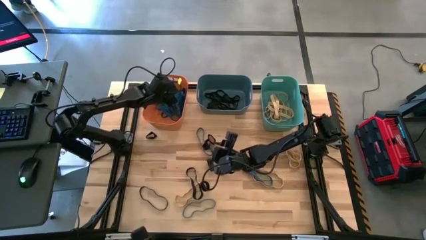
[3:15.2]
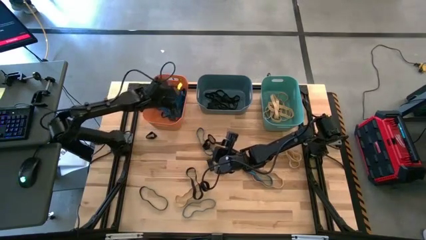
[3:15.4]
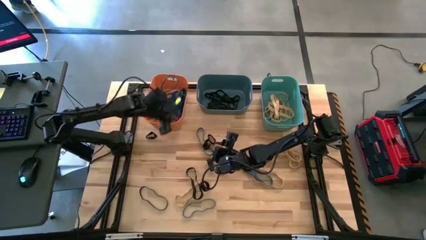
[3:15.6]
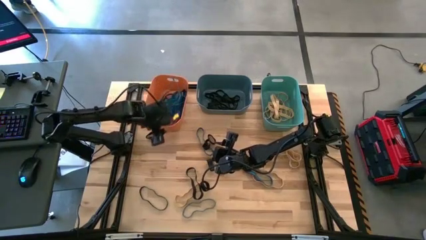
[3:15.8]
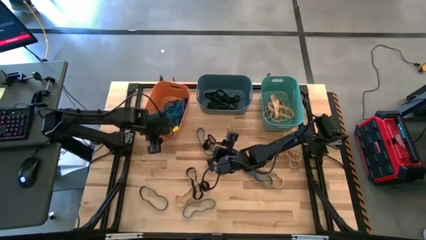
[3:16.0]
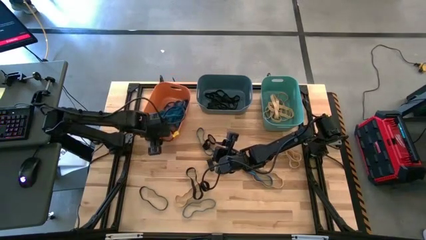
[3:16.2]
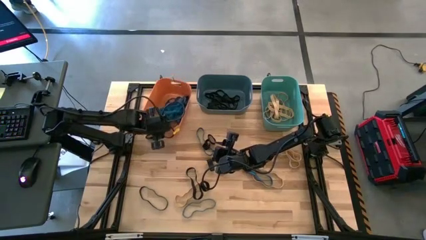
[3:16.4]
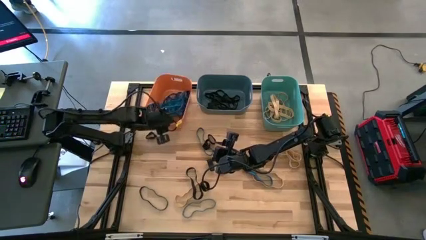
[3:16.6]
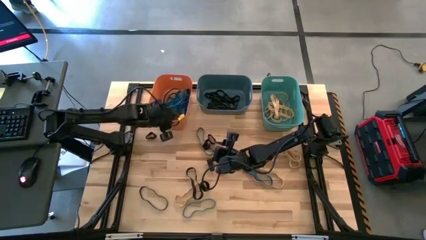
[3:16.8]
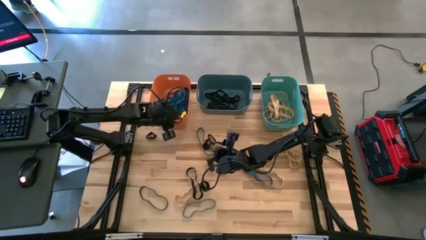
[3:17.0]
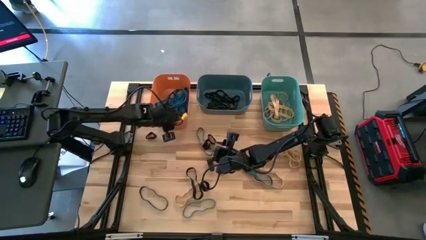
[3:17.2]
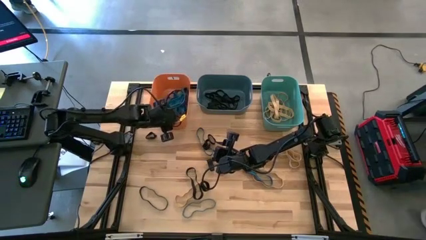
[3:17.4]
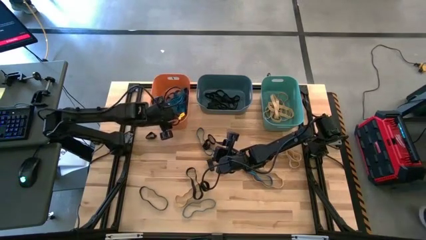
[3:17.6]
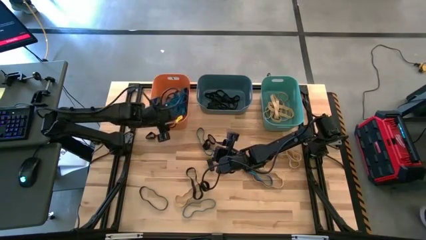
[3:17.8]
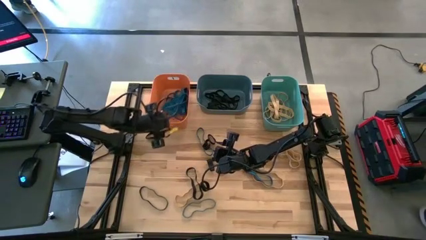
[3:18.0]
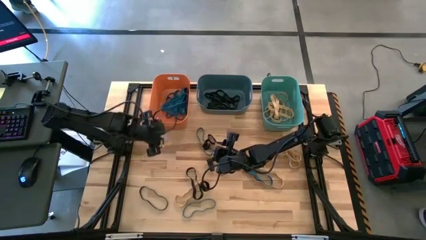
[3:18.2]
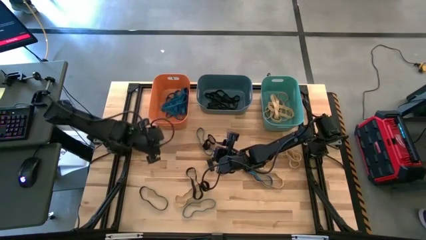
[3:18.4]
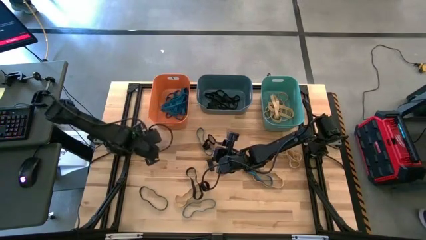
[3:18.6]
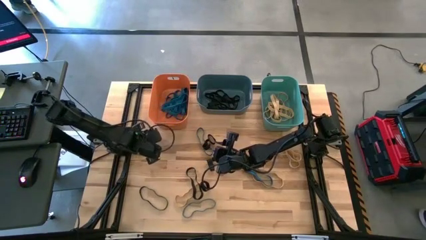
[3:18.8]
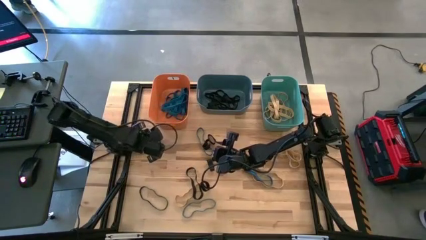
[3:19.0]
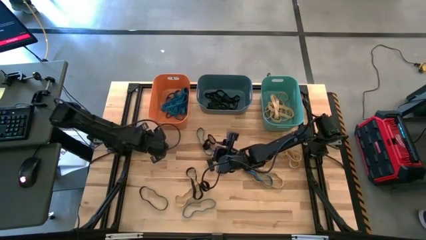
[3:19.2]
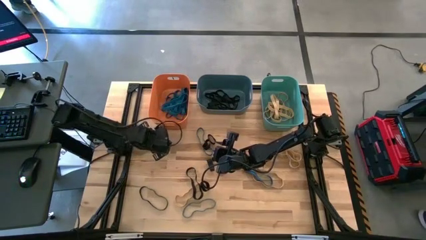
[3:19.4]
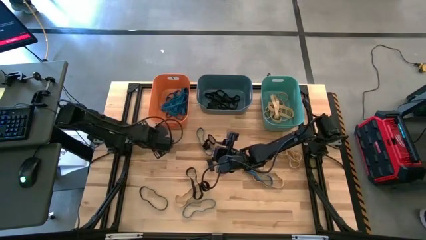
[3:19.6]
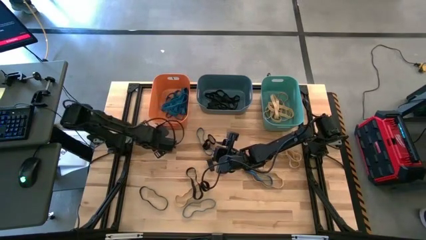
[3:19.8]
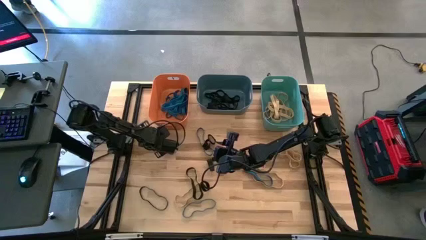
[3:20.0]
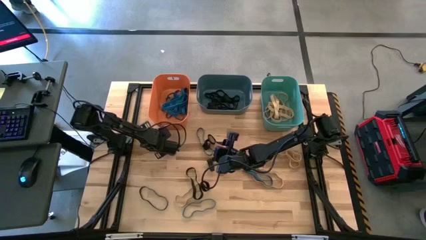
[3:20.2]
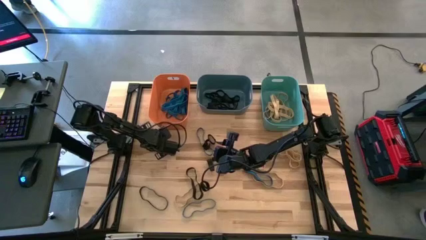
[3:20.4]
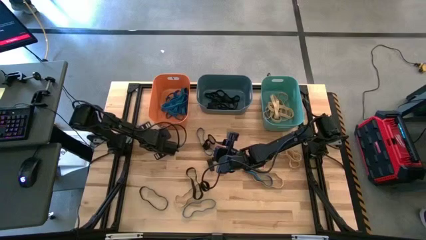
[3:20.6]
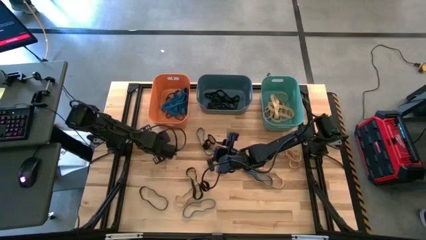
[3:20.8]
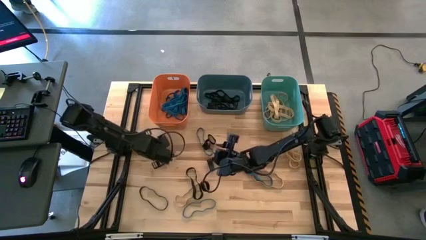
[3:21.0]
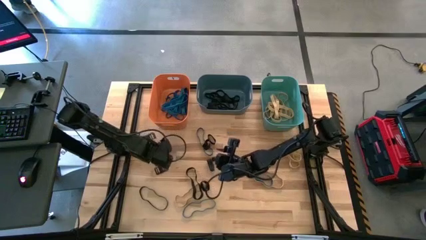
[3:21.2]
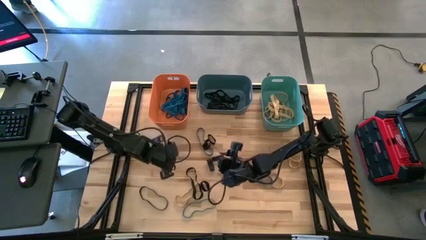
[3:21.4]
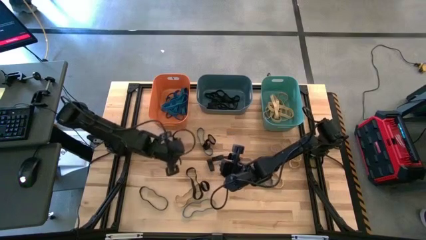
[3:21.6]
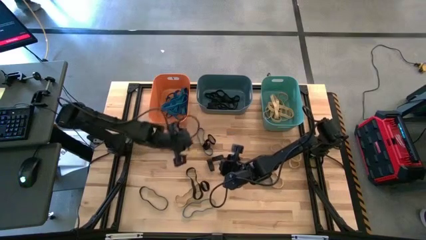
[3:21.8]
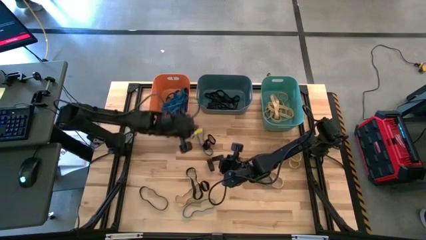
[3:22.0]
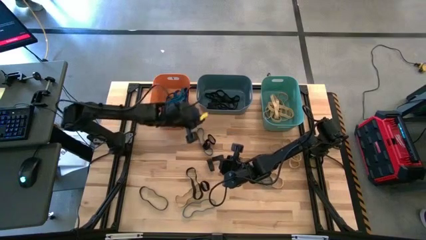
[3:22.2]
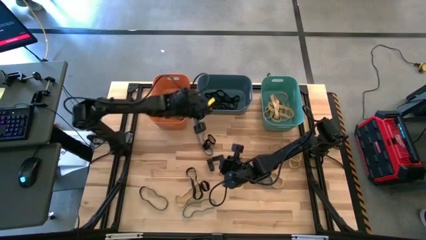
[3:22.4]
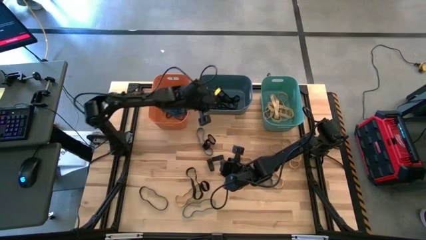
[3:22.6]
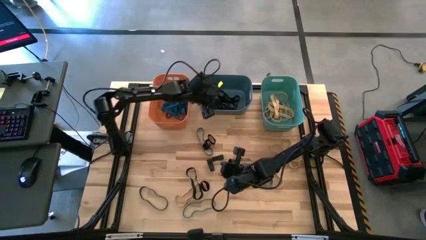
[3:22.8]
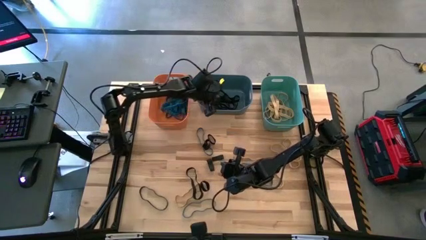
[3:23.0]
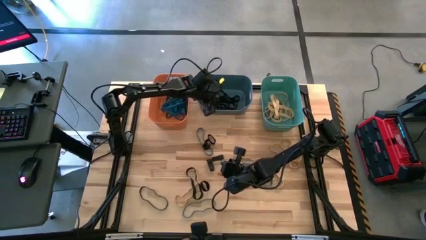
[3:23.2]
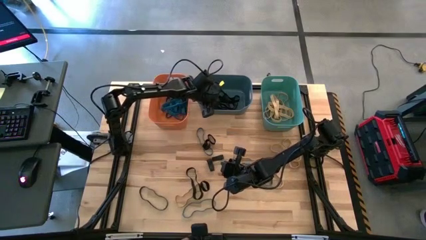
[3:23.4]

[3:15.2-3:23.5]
Task: Sort rubber bands into baskets
Put the black rubber band into the blue bin

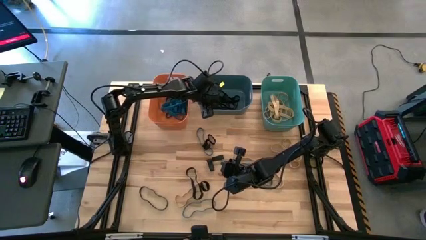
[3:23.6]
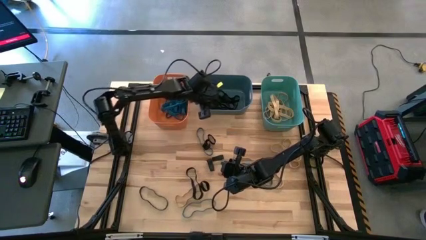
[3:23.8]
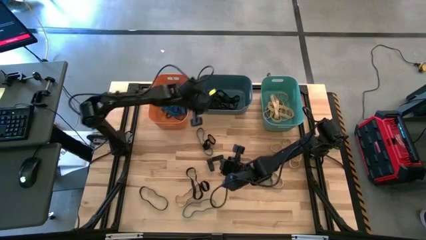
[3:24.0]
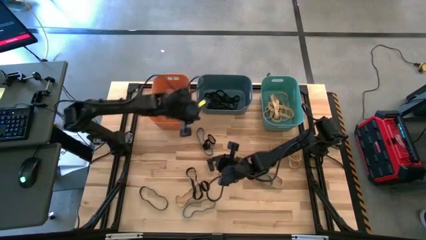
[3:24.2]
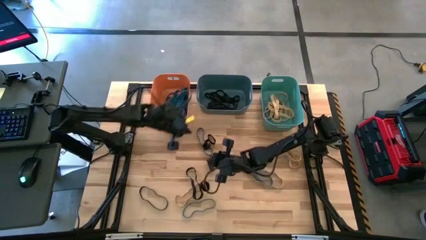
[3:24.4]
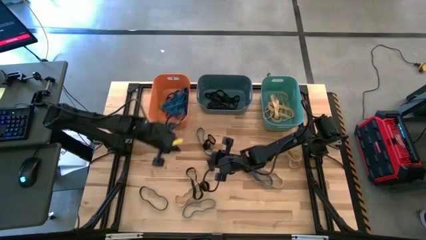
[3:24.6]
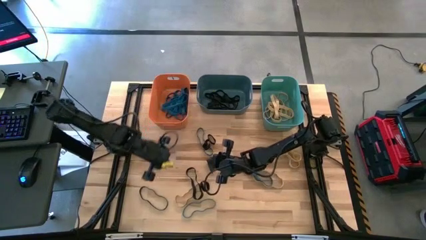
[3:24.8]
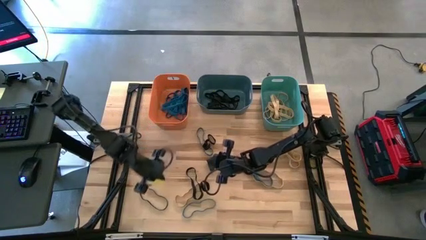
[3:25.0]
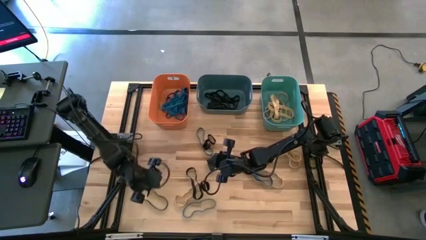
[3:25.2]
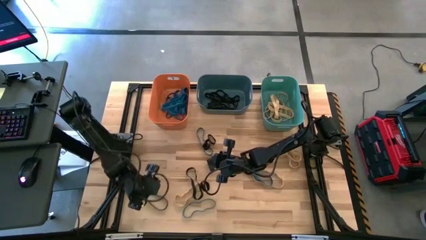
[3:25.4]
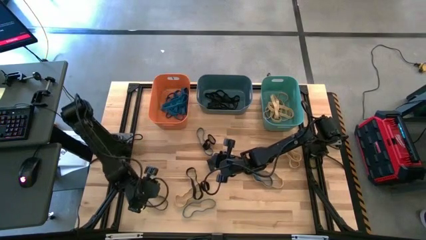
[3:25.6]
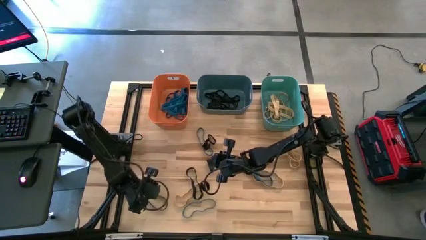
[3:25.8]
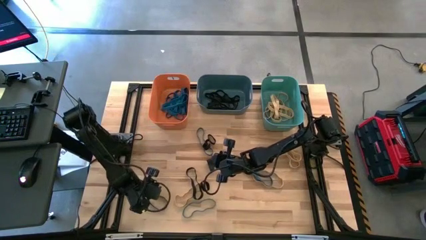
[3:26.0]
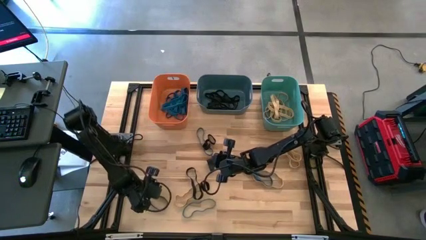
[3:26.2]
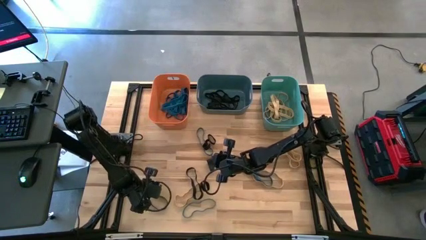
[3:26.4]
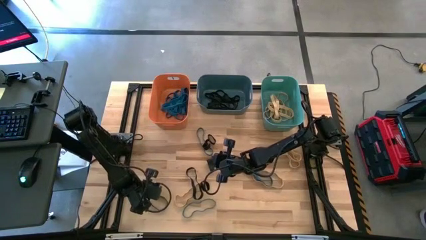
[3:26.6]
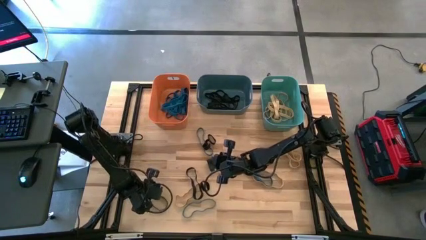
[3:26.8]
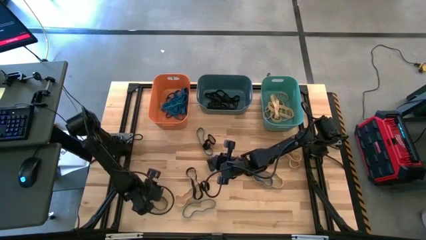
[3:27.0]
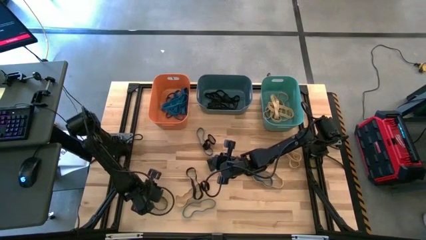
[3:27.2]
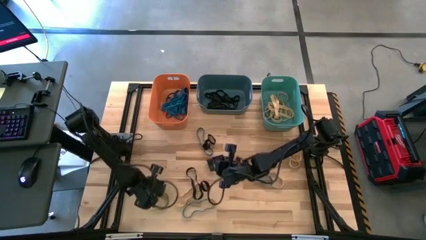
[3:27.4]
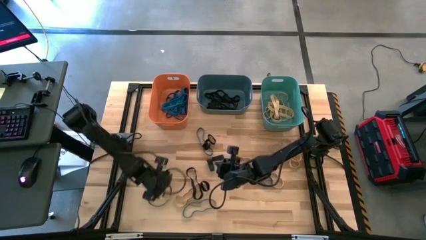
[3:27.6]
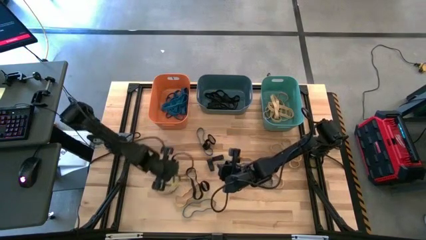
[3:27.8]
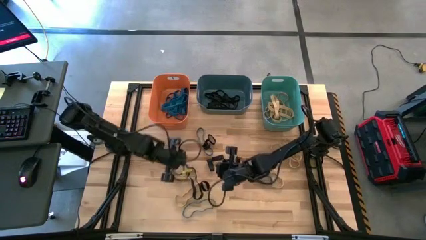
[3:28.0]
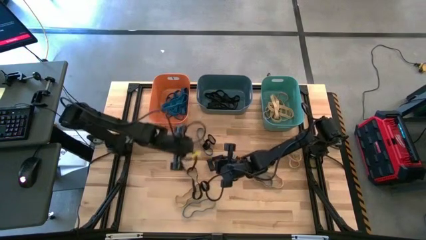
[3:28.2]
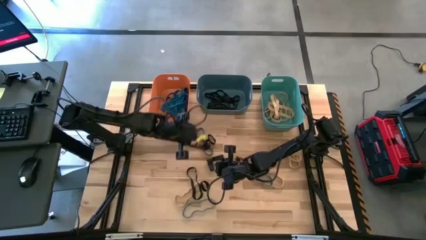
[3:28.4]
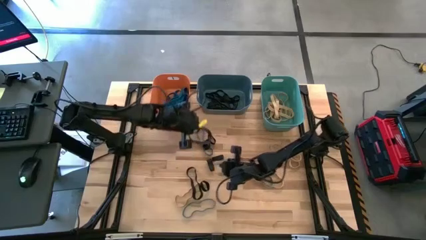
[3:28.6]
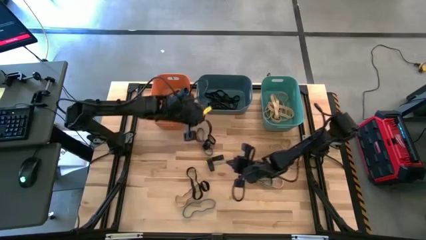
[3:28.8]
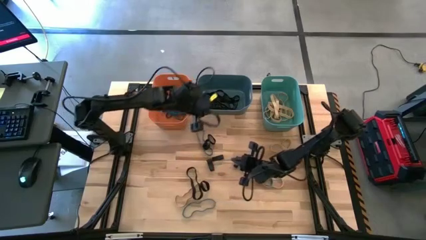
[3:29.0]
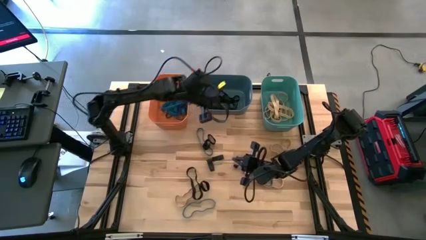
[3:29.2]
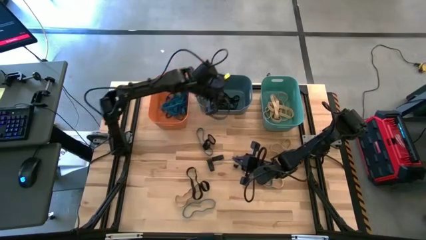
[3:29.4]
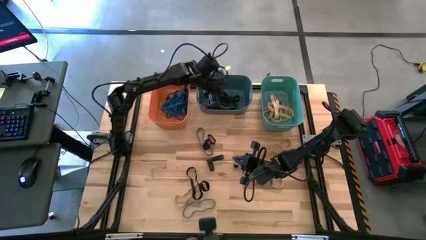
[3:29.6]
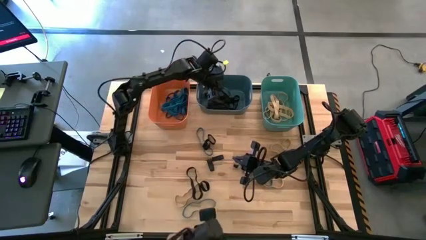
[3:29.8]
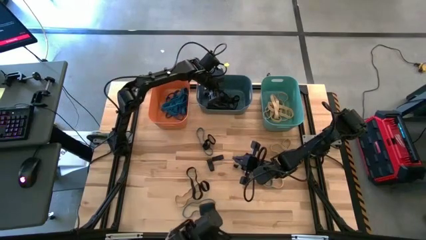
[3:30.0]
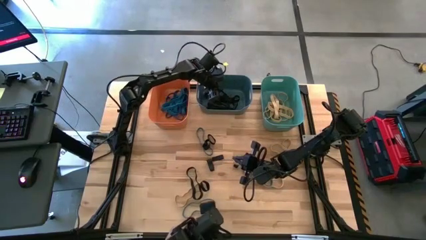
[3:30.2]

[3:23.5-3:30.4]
Put the black rubber band into the blue bin

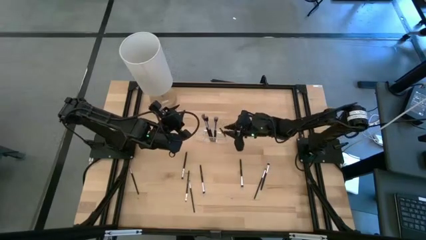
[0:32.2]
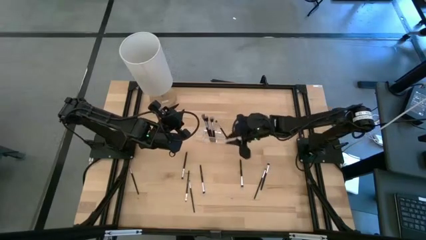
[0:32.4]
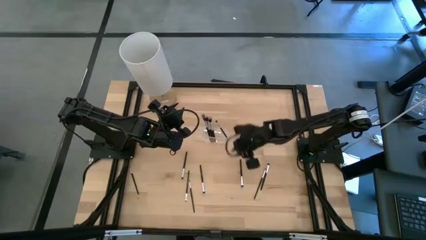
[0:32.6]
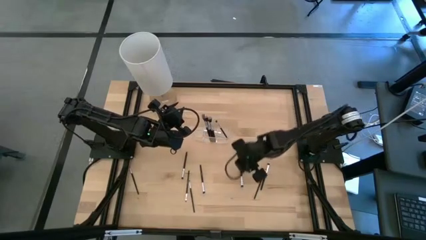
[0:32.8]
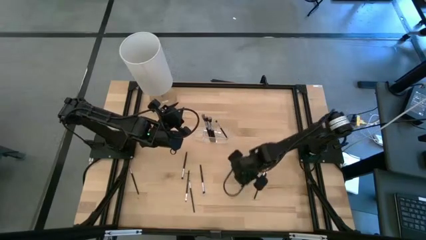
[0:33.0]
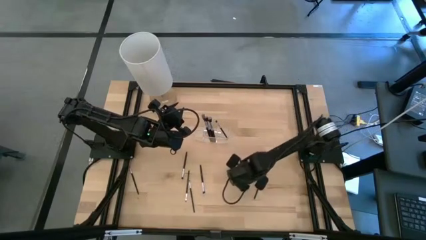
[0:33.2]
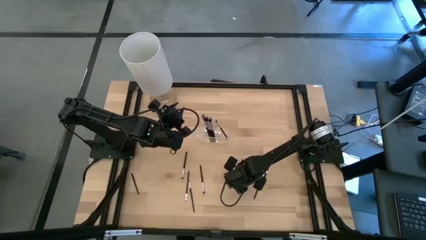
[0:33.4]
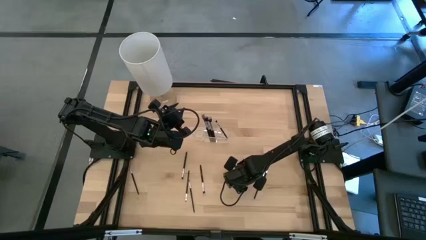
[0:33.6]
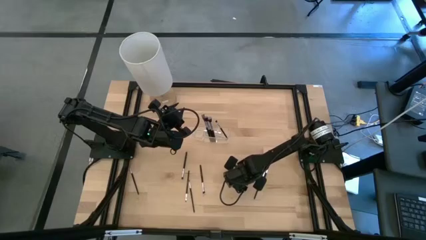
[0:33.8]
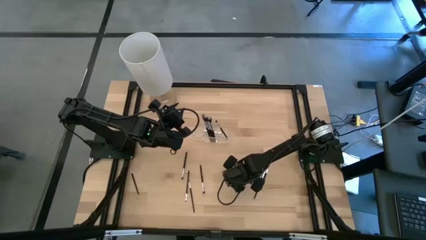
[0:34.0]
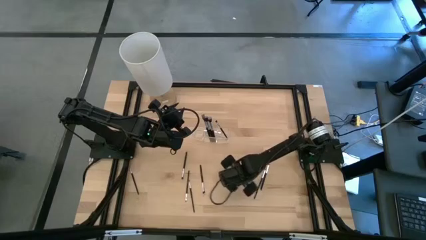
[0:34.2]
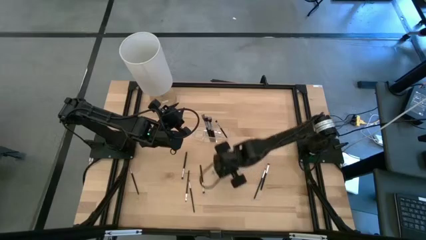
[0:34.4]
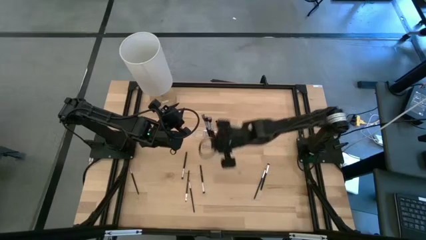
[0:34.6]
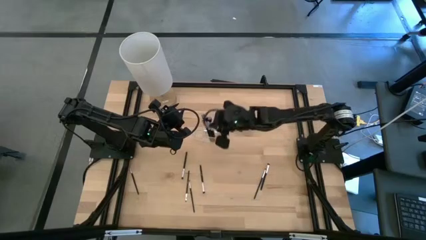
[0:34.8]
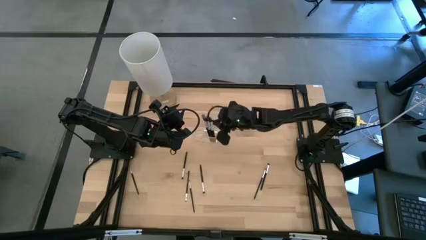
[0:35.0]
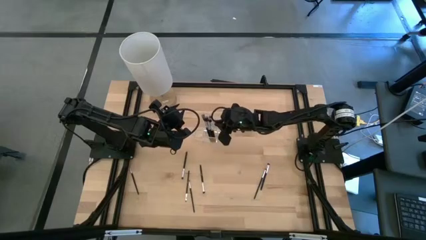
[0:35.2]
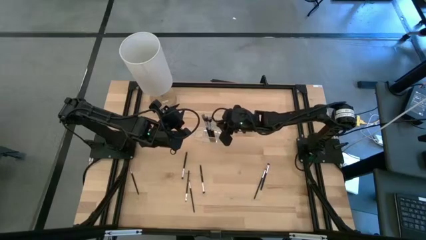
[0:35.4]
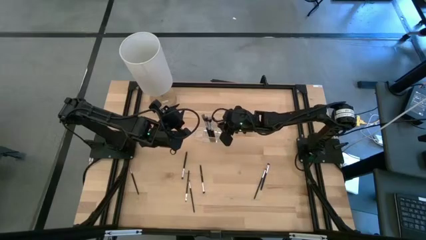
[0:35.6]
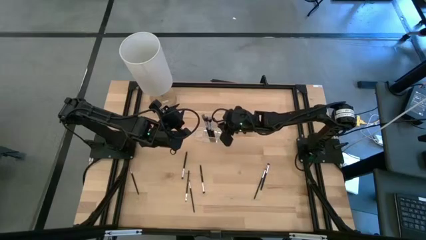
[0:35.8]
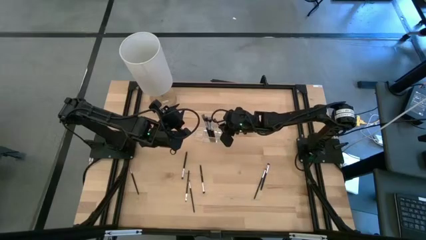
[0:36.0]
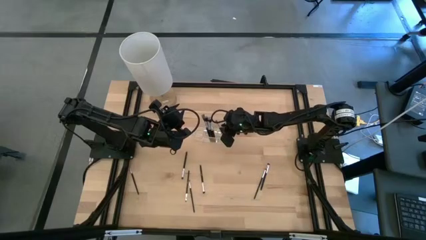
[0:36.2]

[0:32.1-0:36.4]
Task: Put items in baskets/containers
Put the black foundation brush into the transparent organizer
